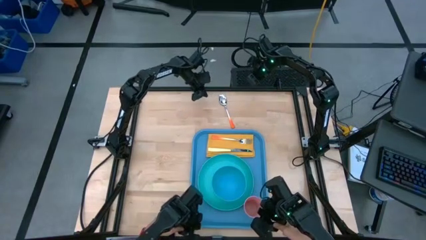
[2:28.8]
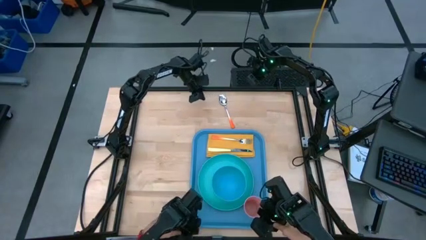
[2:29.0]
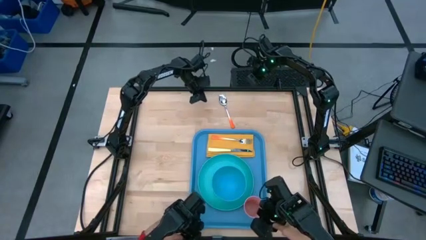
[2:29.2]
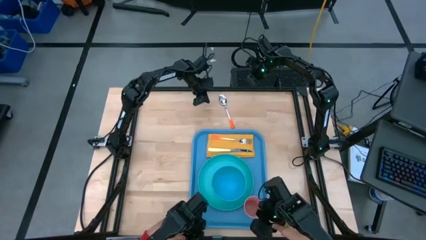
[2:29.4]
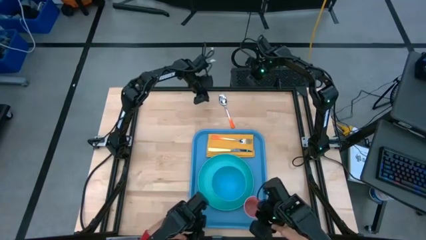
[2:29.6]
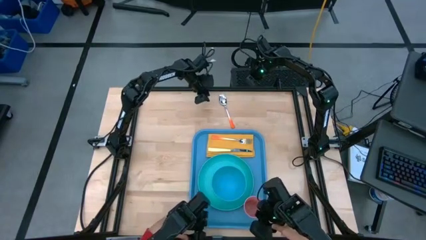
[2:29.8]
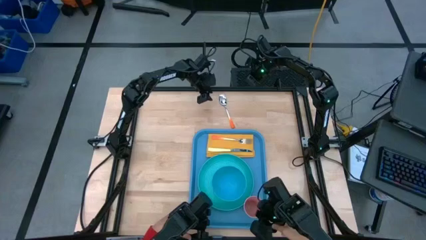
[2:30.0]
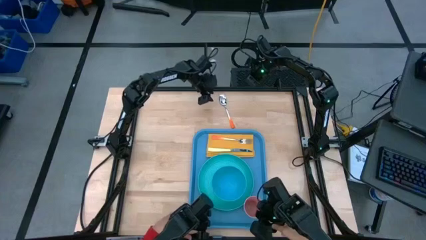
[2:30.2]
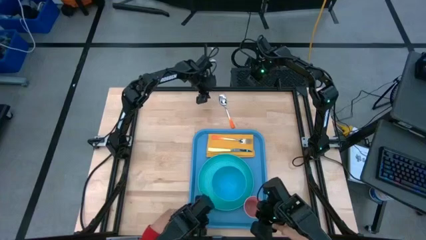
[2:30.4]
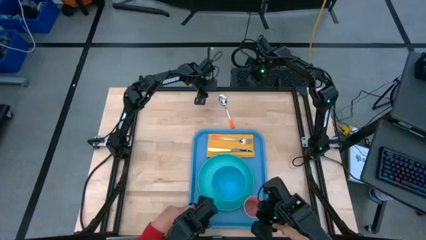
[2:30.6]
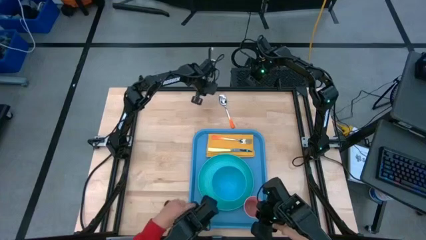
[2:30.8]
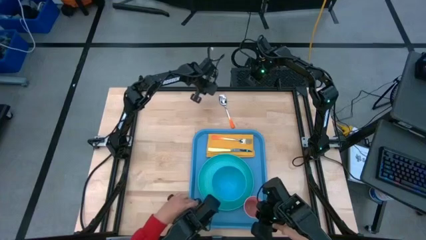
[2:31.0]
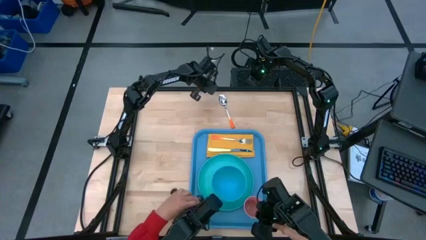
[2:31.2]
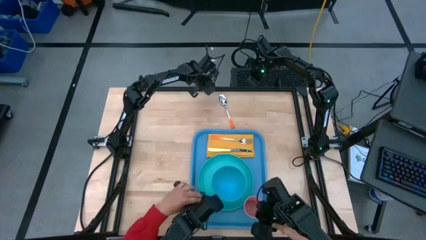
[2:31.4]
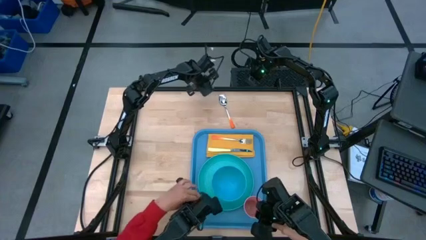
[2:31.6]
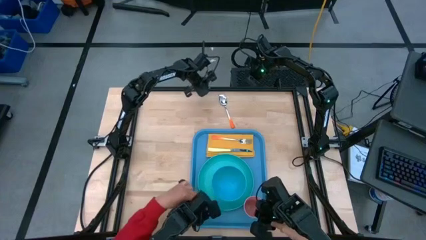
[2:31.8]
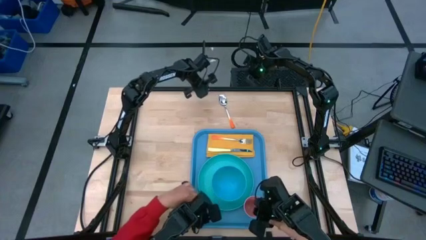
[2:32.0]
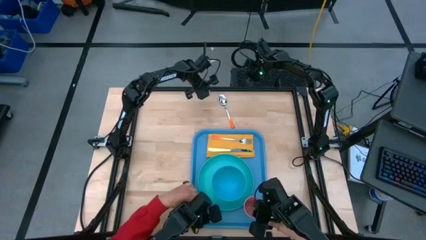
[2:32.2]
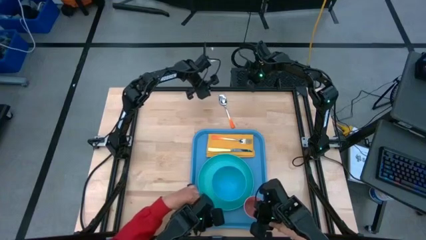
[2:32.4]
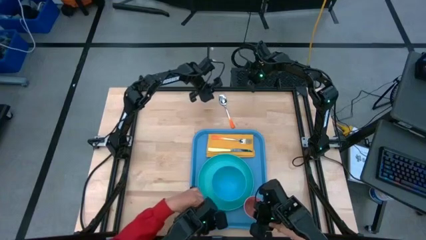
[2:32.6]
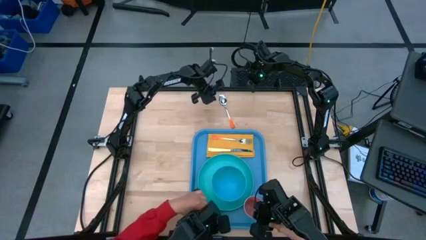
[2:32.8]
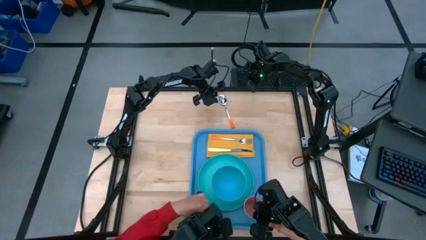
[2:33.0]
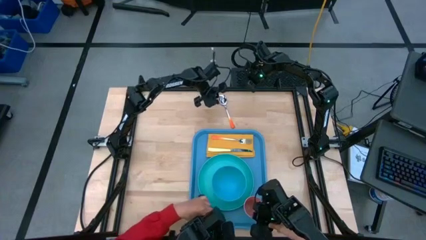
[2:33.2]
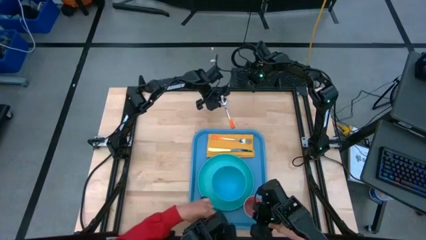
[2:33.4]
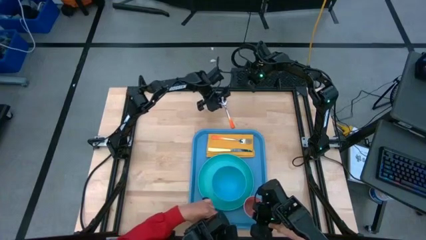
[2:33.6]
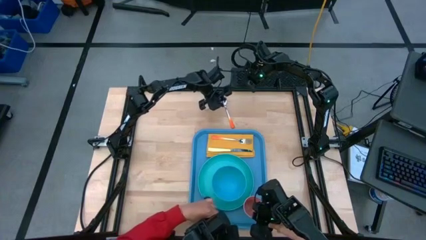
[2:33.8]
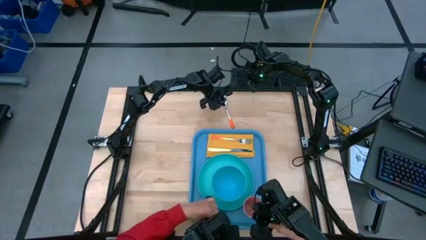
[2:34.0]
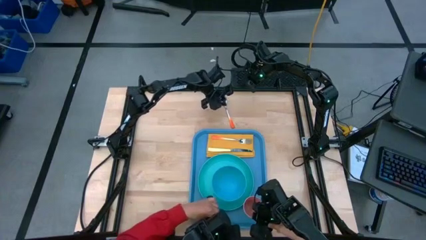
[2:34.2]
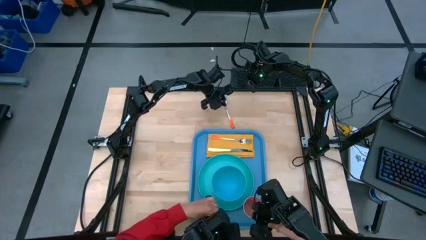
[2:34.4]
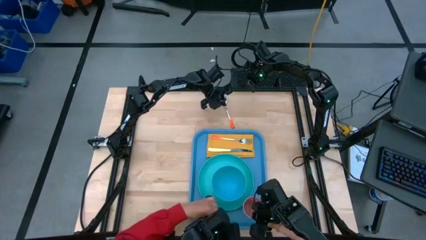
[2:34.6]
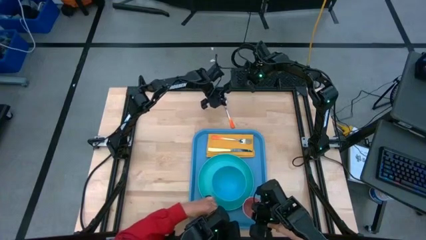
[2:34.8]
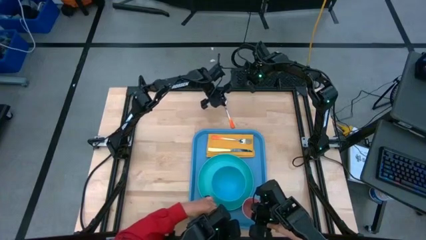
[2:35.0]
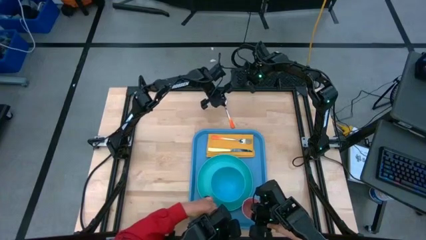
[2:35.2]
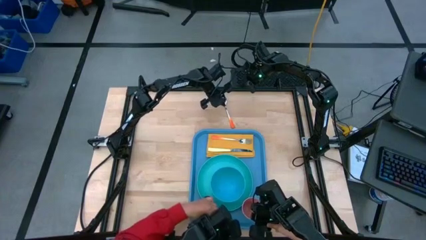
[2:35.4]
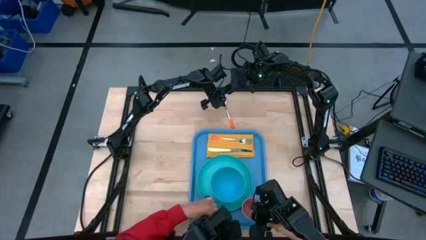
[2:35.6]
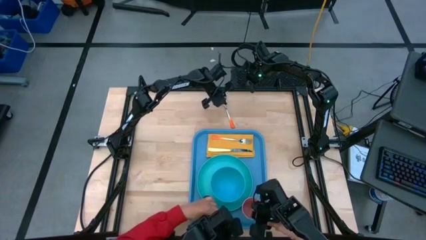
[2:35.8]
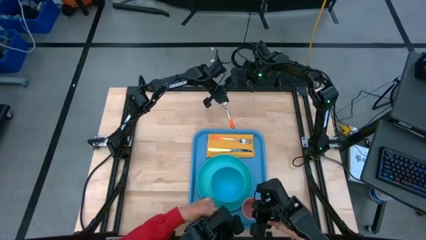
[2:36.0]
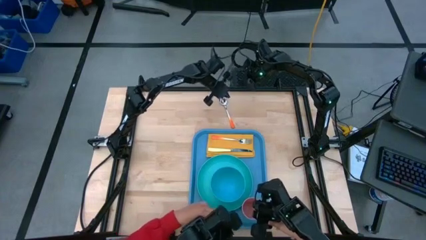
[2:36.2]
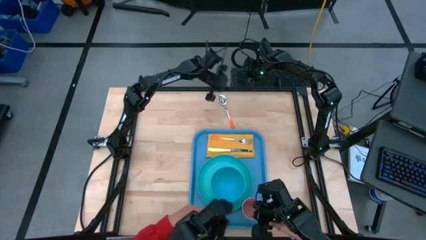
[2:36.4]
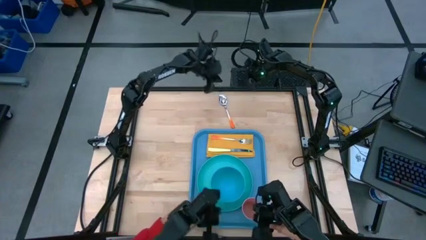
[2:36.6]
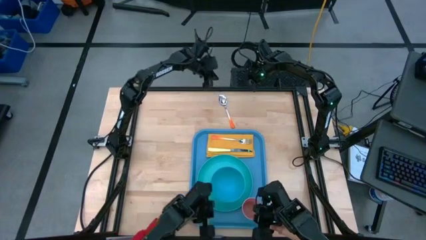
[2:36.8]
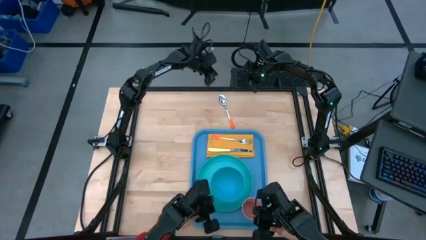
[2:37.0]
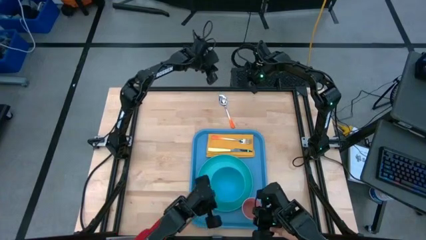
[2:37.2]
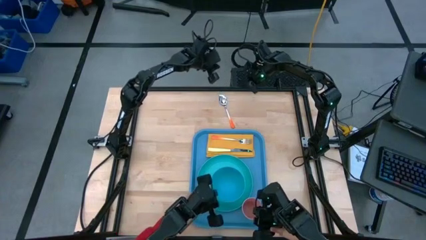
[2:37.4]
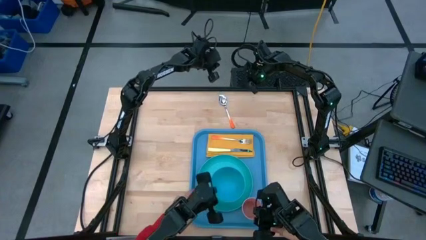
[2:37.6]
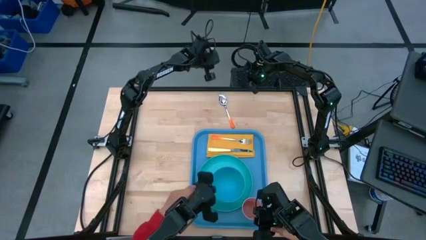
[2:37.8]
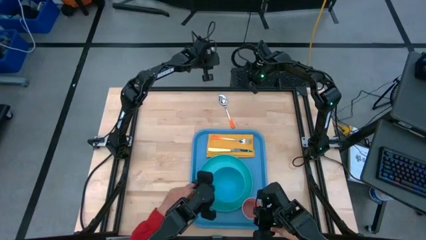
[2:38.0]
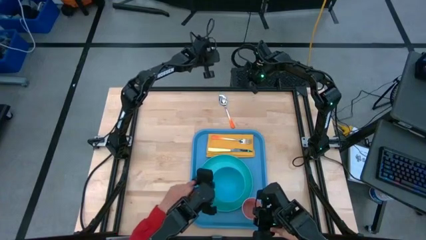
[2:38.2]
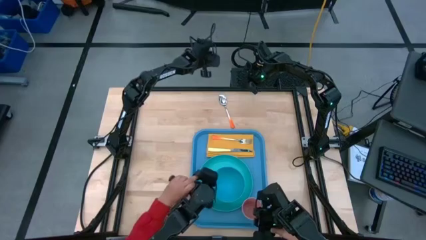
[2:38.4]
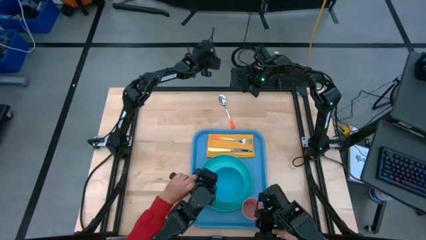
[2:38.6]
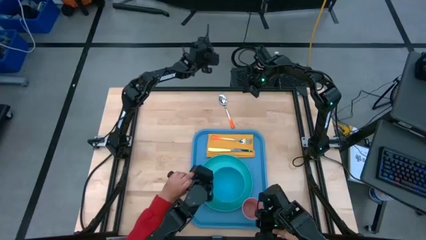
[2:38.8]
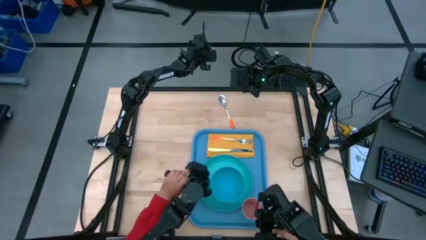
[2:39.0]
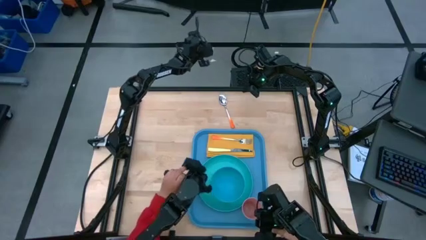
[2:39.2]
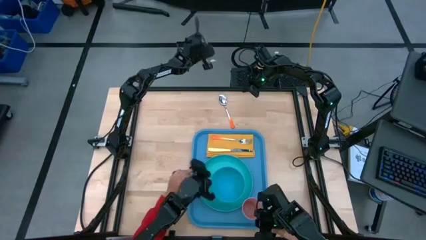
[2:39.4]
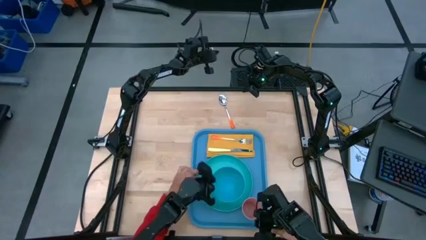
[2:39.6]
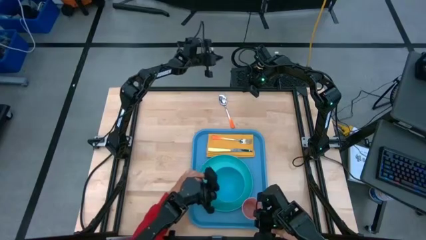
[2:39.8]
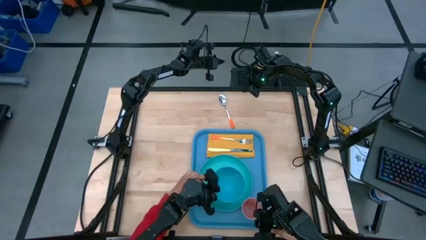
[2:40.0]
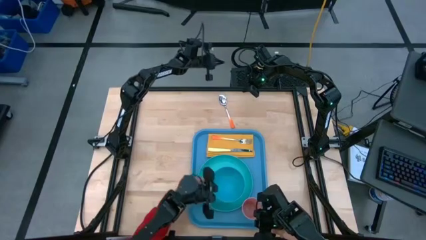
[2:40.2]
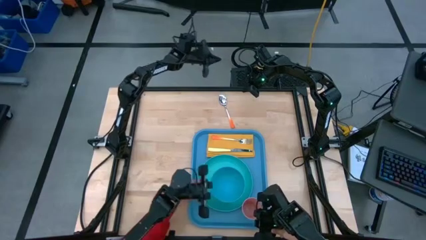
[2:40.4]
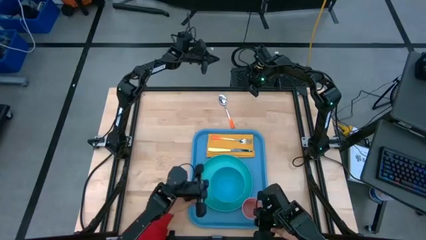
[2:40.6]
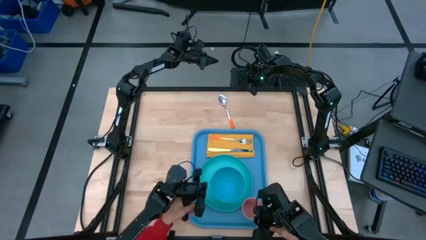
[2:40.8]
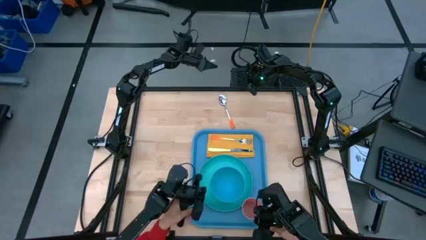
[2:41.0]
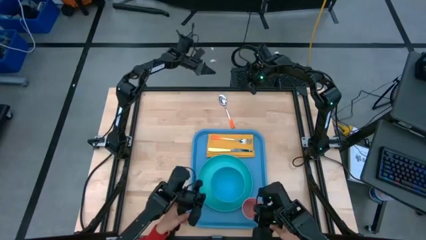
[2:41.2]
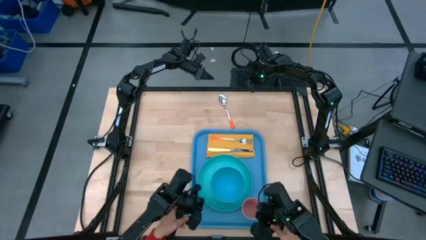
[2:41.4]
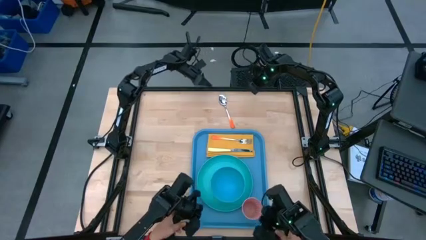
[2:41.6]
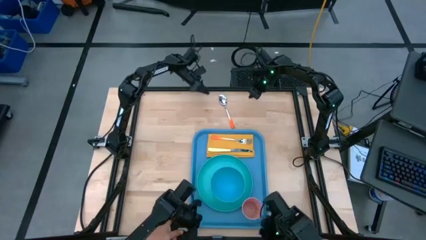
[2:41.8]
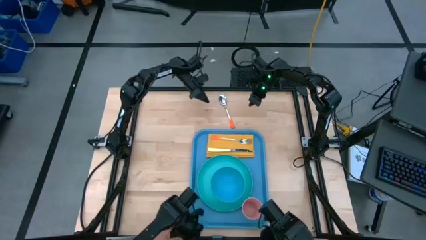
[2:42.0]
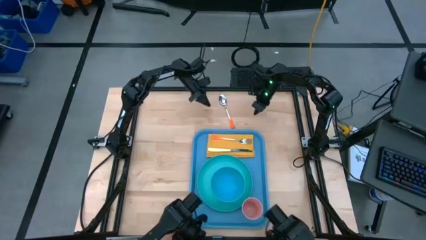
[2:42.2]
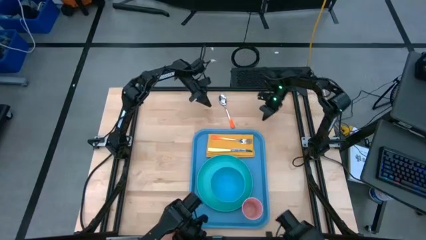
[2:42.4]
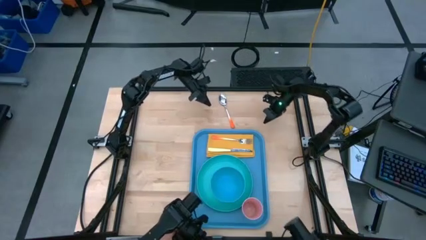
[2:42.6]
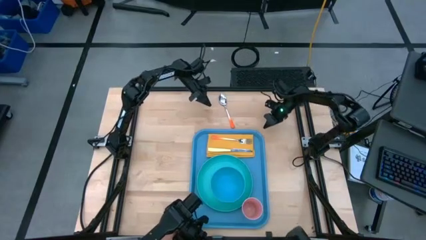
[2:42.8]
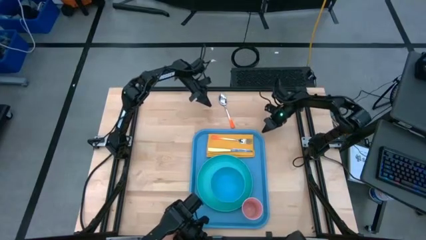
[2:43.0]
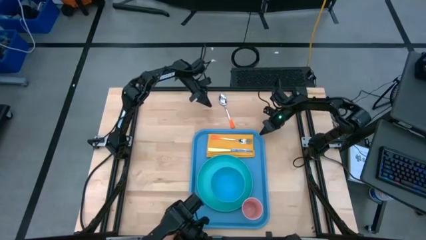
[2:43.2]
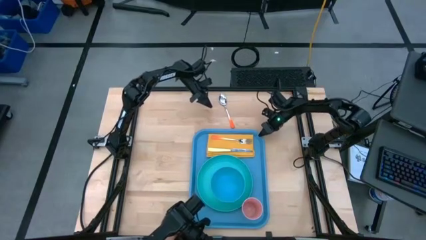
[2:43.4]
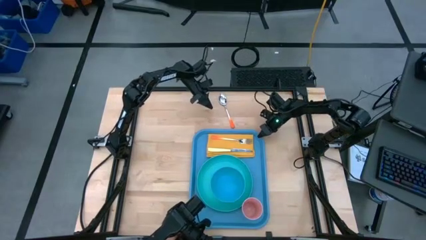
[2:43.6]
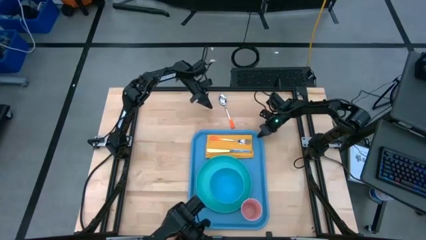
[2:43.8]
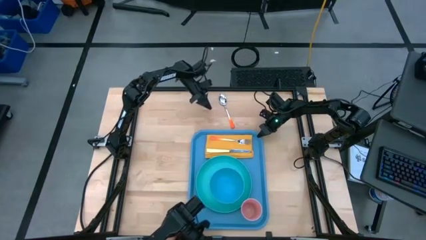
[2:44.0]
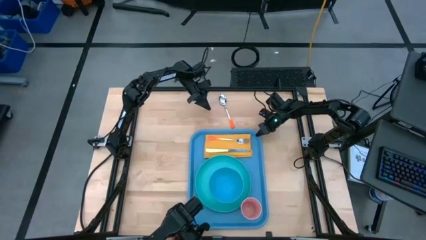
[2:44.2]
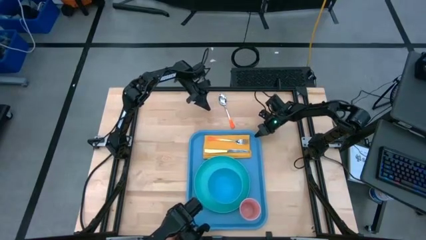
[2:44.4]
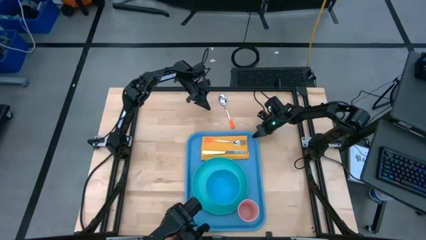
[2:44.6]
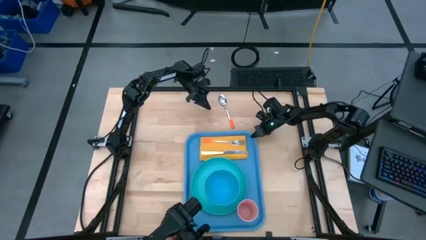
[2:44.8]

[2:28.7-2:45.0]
Task: Set up tray
Adjust the blue serving tray
